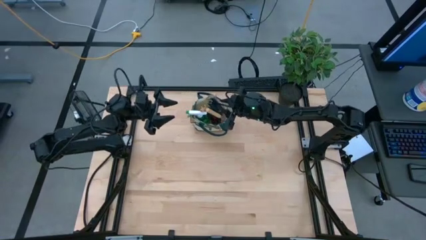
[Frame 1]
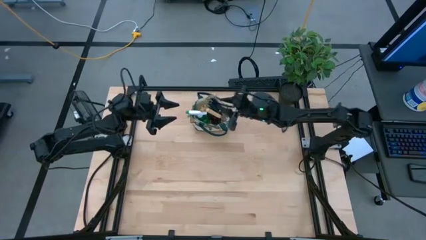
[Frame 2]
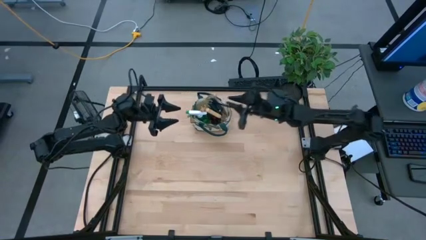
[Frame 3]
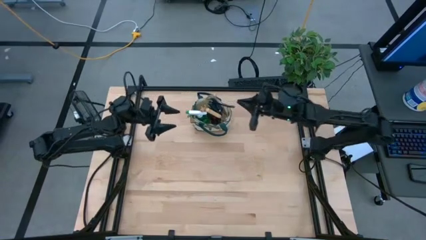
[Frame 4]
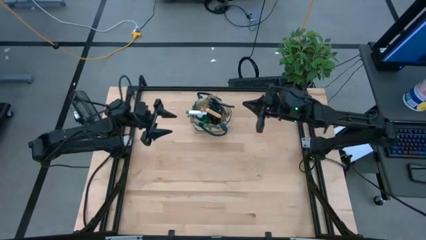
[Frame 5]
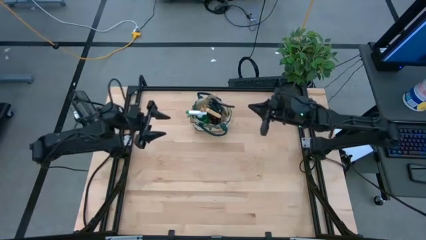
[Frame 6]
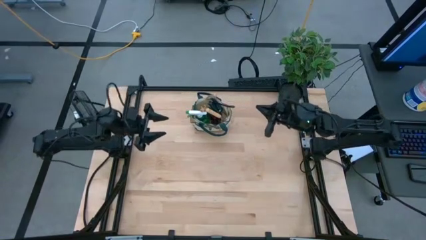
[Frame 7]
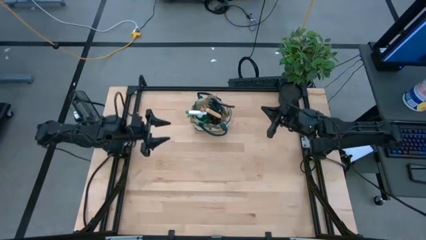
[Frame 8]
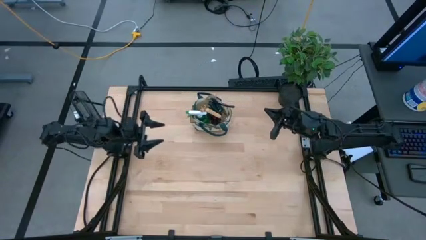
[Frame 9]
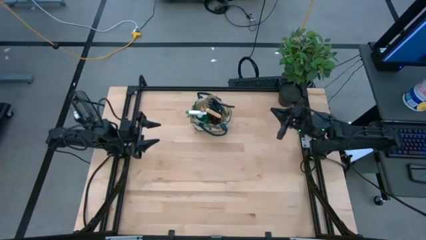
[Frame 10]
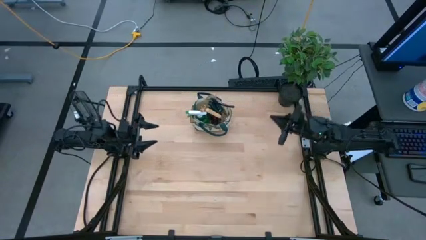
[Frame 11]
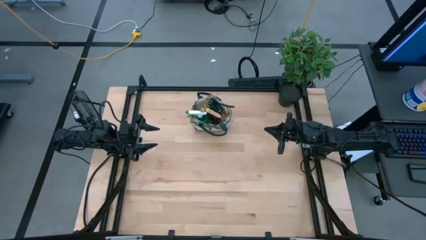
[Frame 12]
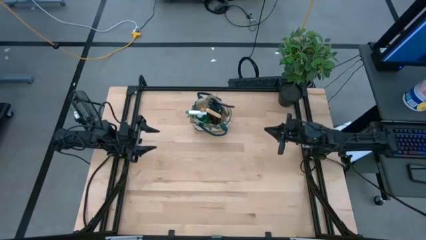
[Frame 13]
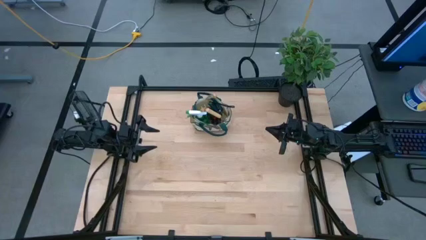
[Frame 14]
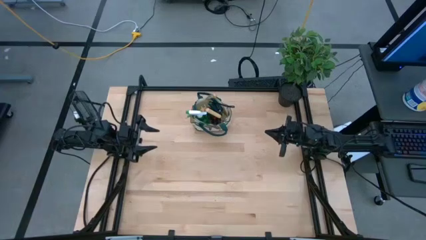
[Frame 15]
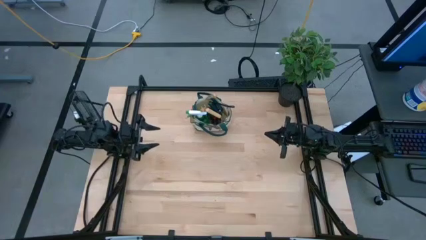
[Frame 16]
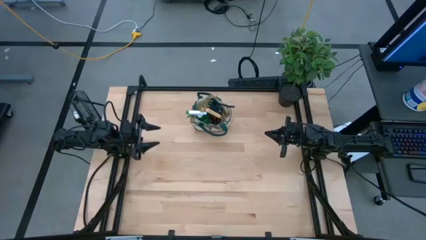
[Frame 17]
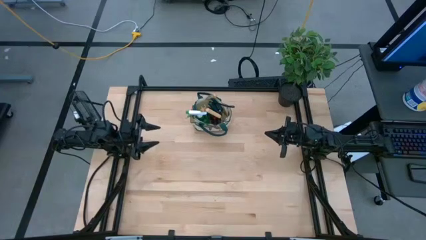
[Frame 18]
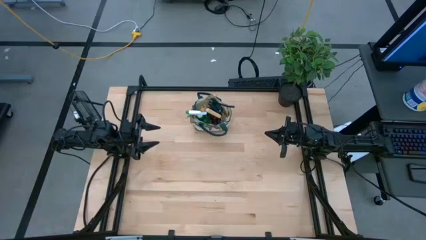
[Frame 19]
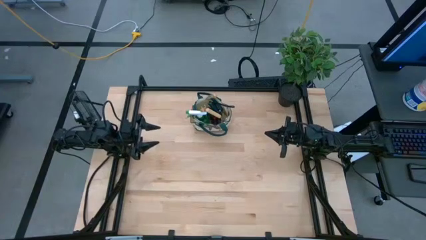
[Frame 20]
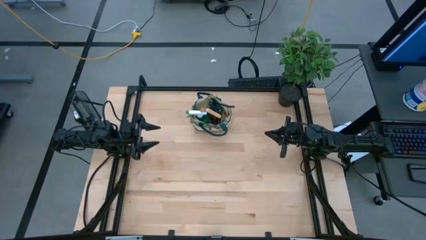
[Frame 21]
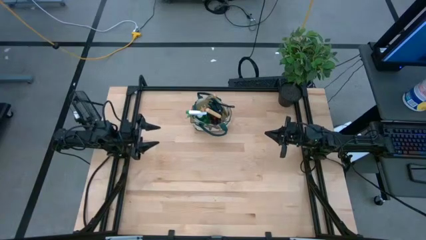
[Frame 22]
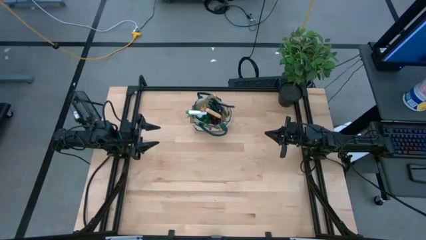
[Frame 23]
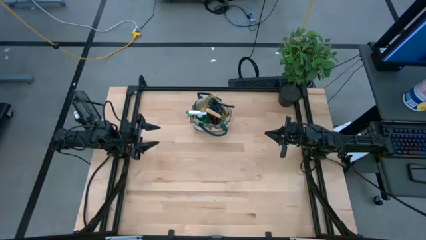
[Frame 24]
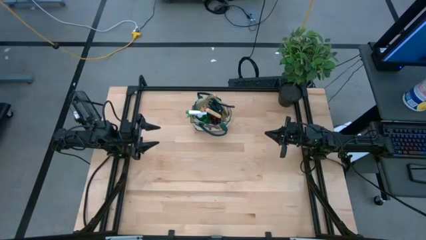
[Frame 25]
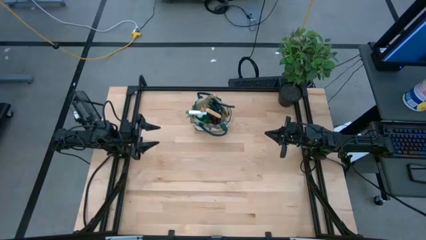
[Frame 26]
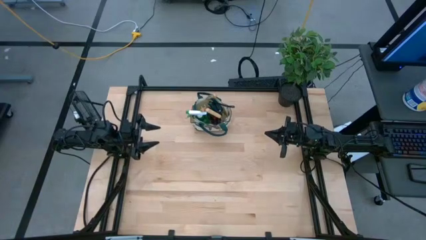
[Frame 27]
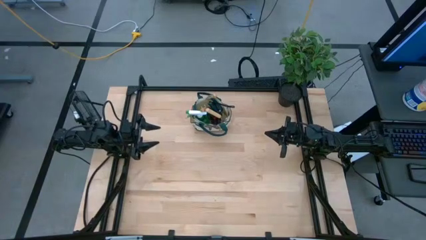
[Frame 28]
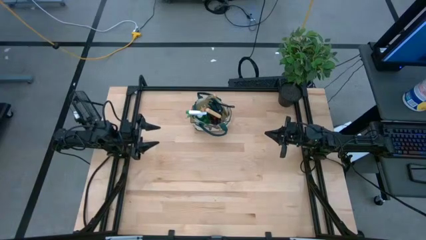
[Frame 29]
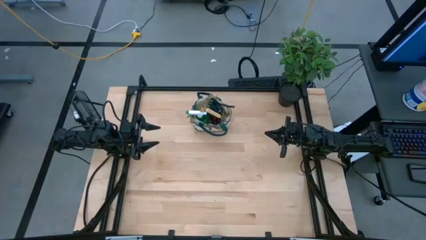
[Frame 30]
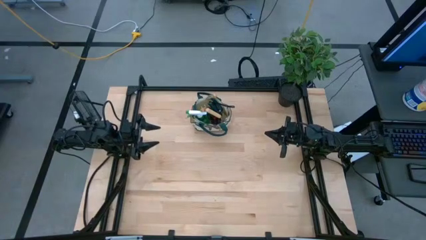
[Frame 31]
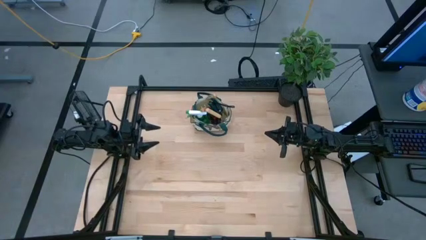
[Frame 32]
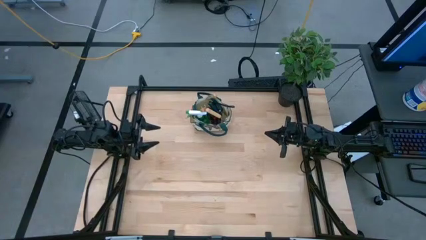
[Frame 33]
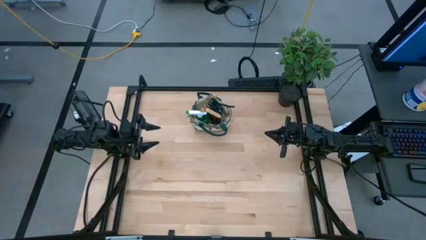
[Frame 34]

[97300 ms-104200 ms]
Task: Pick & Place Garden tools in Gardening bag
Return to Home Position

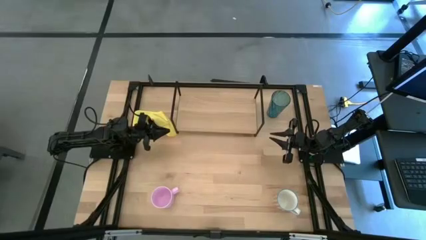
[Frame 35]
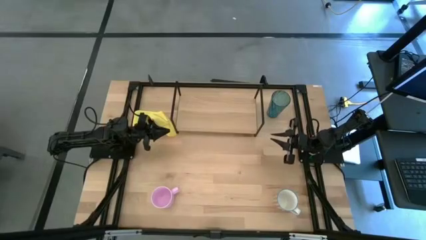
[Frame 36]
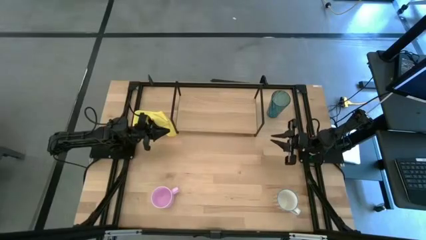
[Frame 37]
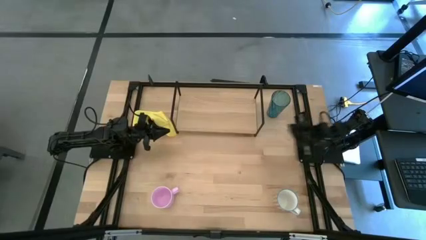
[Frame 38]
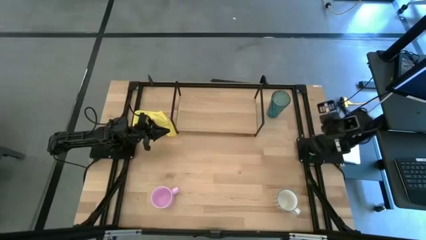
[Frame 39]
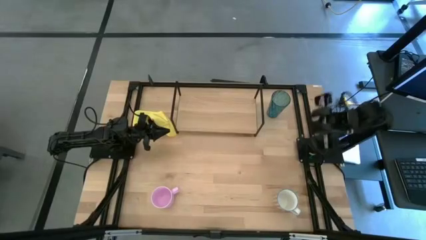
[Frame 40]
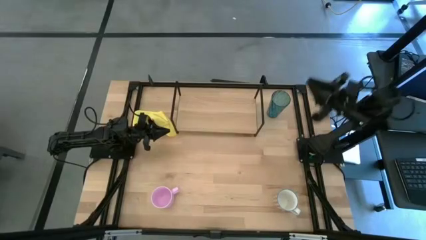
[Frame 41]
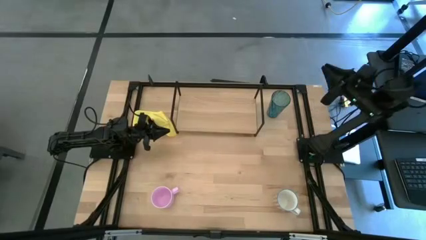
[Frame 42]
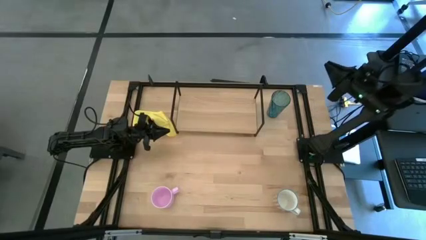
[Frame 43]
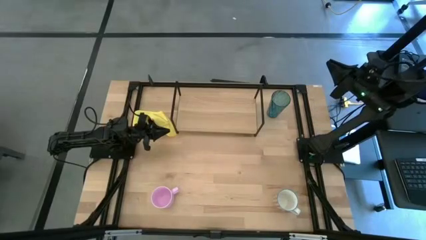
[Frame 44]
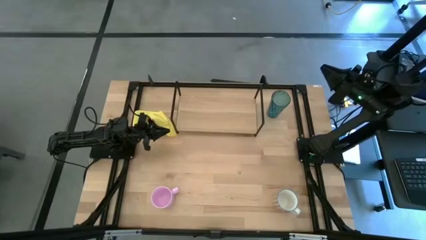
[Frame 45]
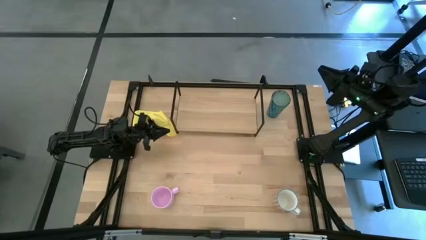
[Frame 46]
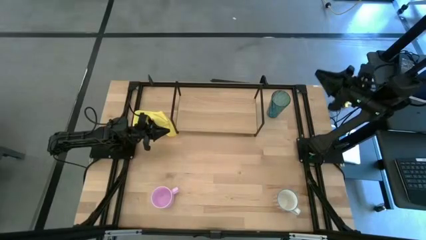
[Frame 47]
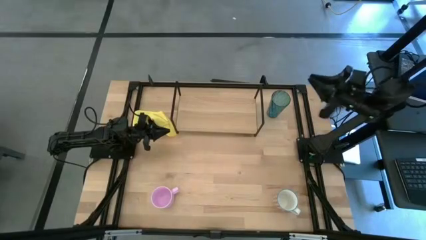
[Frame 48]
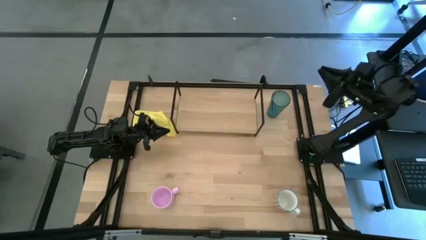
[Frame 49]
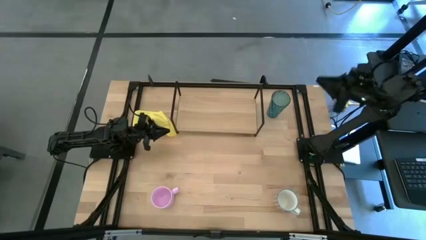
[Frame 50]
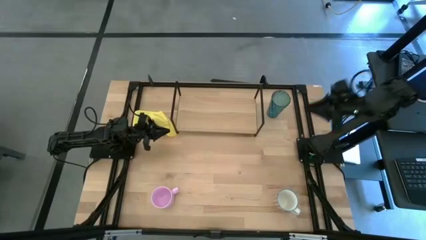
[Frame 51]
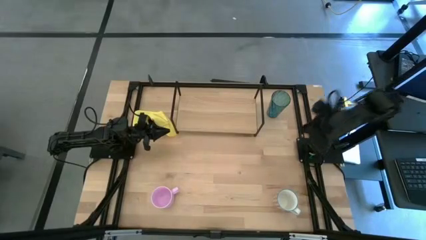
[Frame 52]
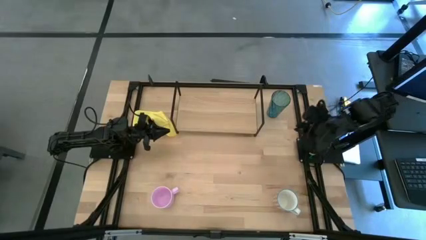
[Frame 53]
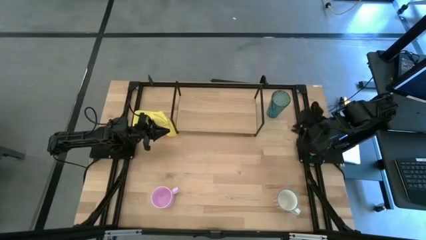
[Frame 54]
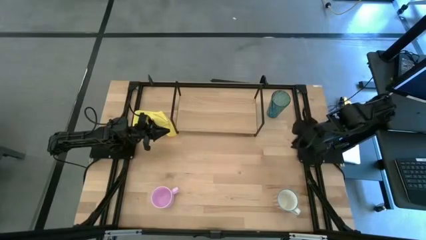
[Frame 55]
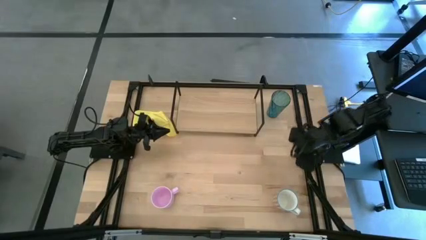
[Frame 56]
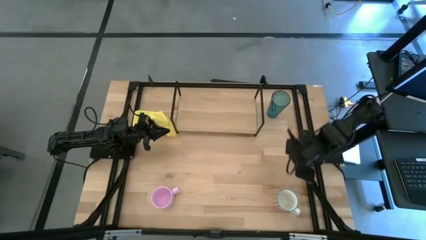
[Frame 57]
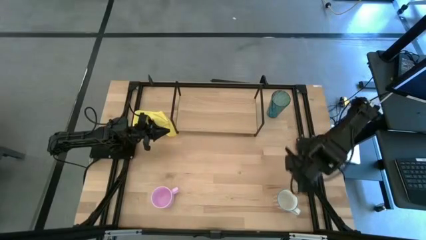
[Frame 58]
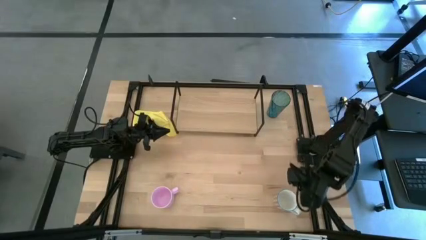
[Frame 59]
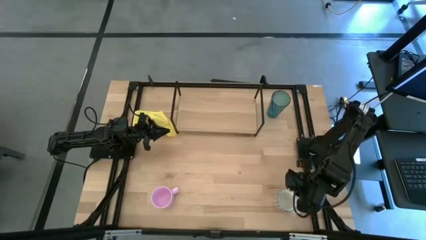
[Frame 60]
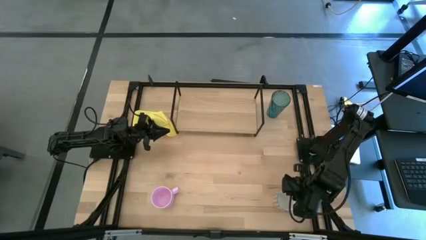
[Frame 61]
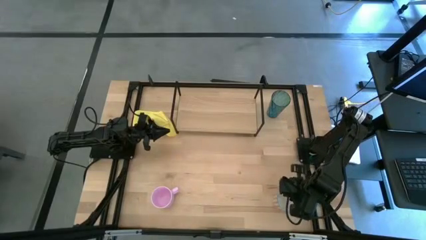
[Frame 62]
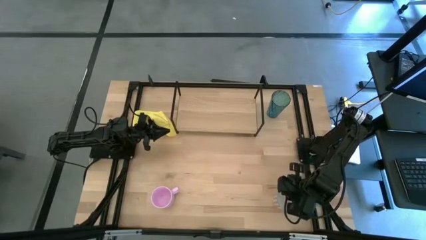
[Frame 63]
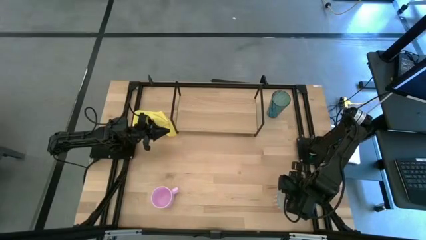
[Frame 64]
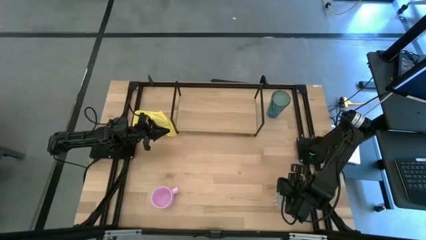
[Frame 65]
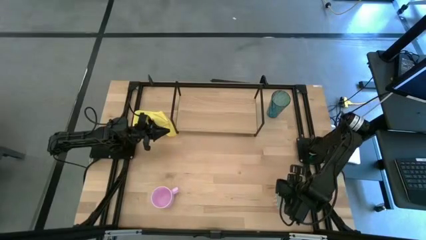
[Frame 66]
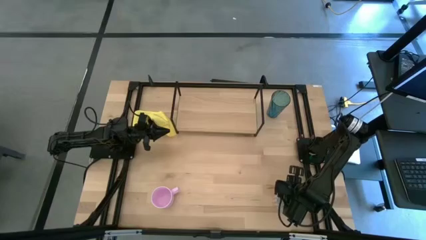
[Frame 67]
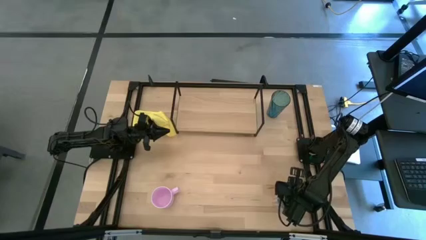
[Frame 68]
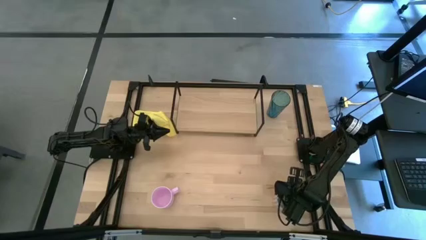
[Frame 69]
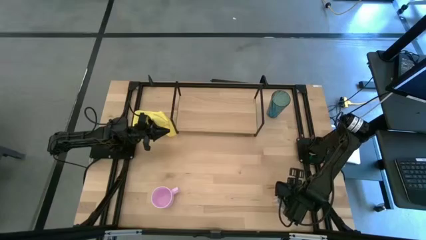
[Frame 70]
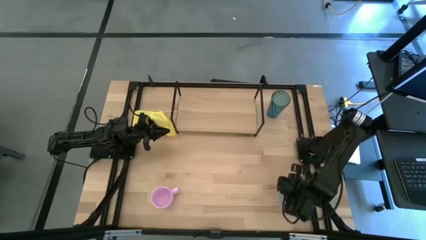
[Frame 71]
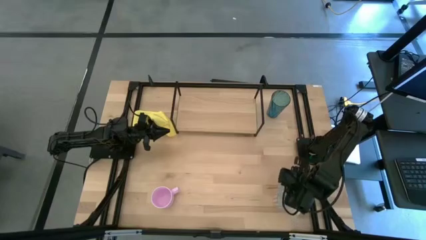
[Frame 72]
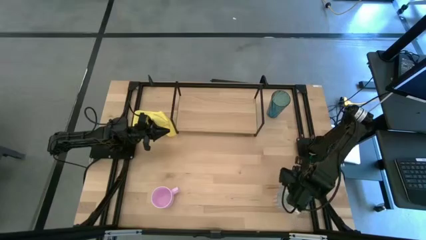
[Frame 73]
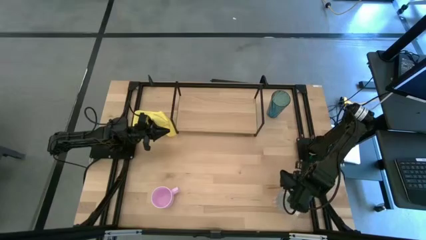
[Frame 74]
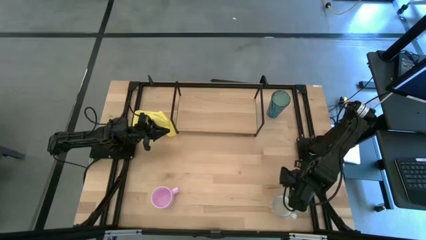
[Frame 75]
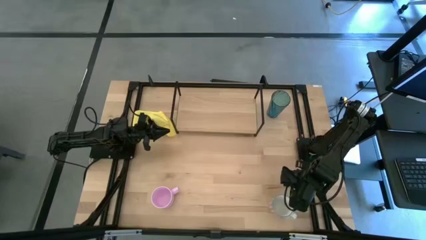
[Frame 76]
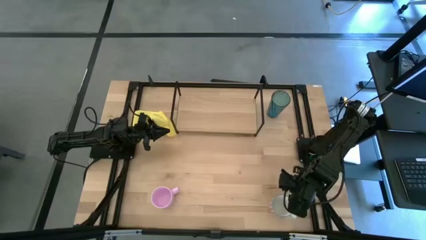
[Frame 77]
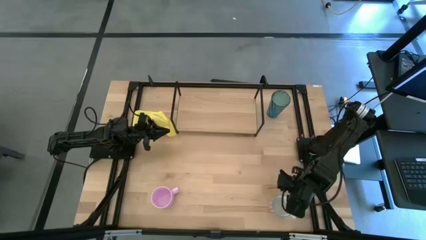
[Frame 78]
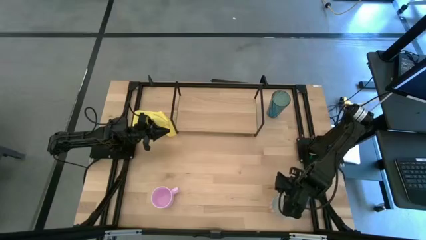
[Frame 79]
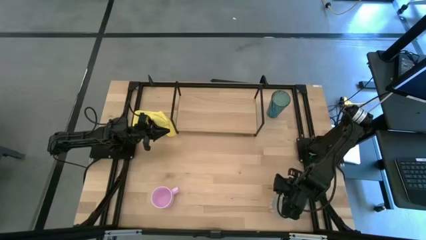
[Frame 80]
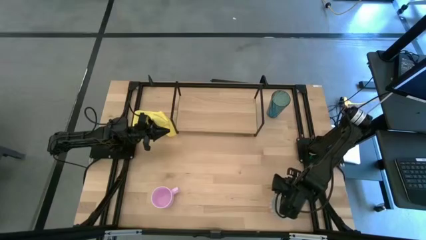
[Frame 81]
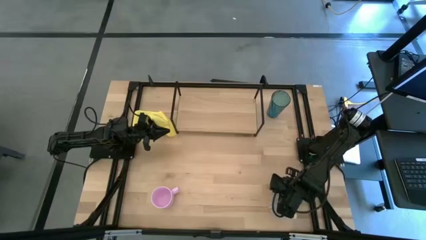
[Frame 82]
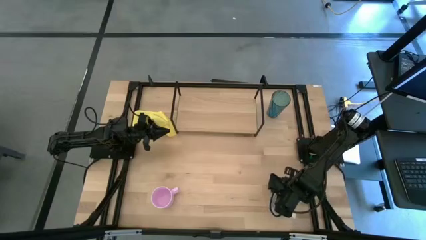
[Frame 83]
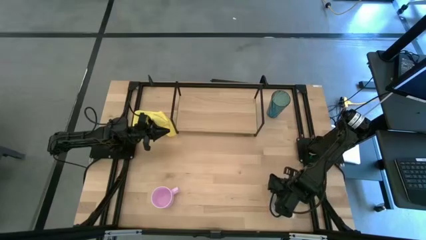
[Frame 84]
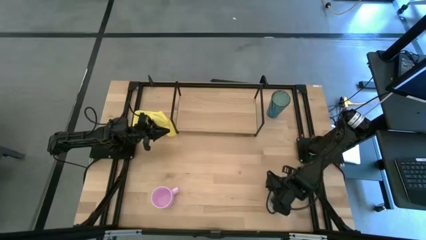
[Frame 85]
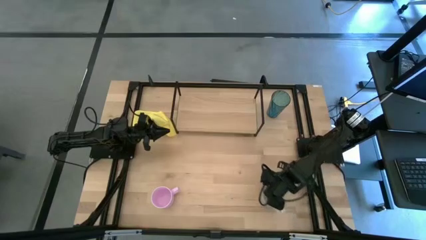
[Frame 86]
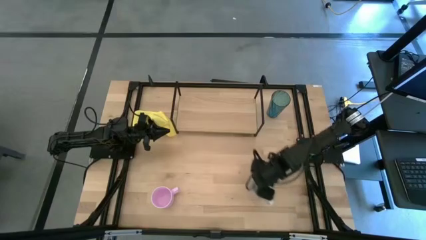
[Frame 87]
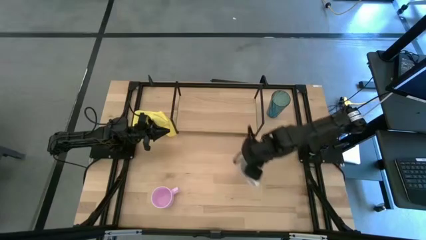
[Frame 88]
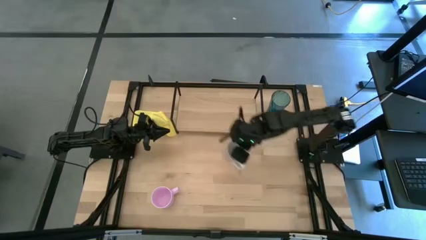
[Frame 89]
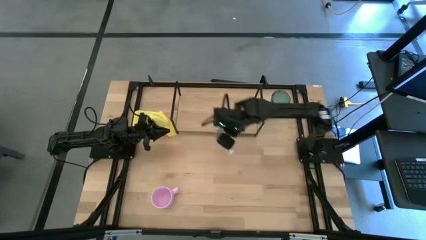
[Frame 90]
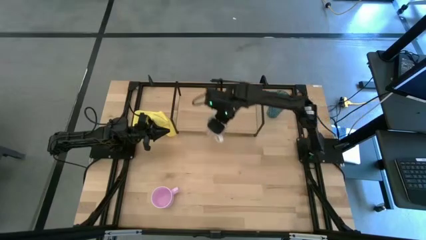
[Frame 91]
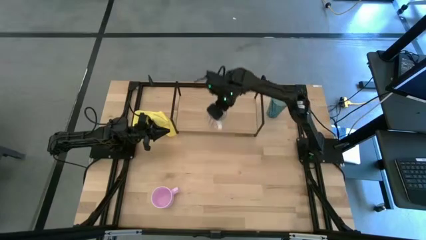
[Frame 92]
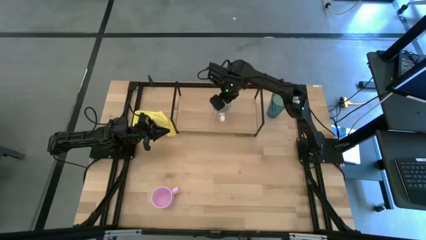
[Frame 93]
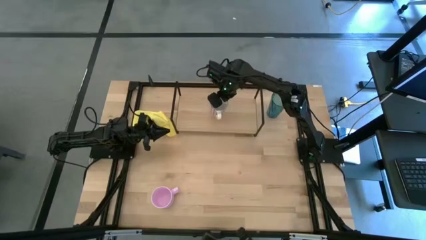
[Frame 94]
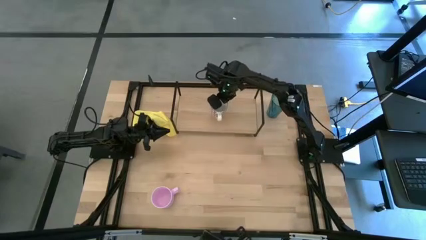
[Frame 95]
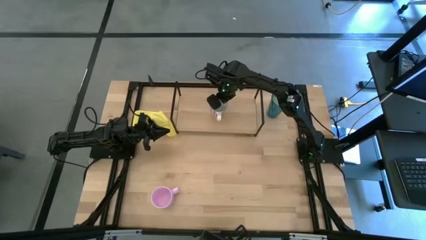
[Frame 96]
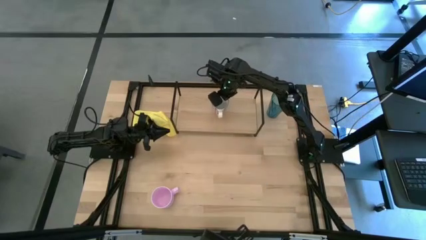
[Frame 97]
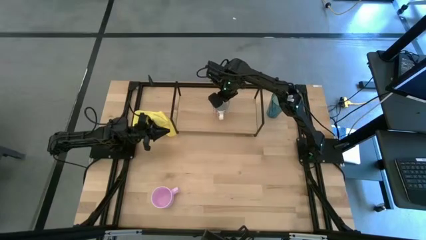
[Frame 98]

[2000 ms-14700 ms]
Task: Stack small to large cups/mugs on shelf
Put the red patterned mug on the shelf
